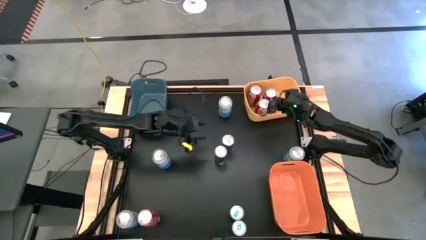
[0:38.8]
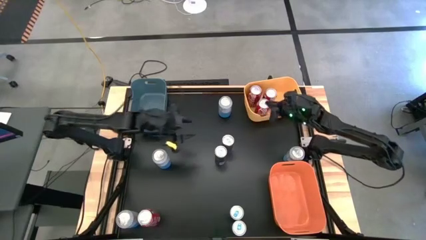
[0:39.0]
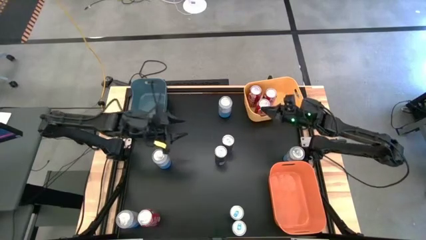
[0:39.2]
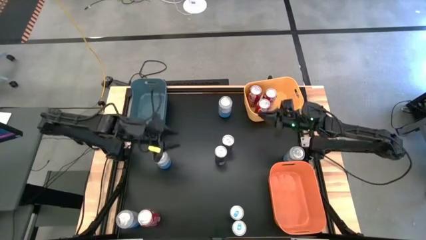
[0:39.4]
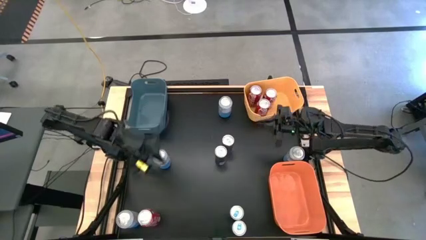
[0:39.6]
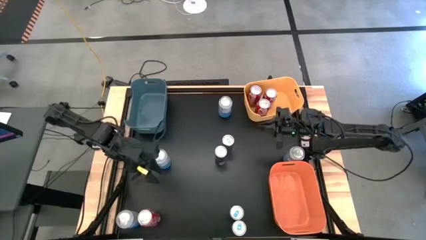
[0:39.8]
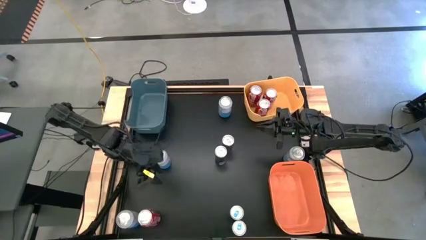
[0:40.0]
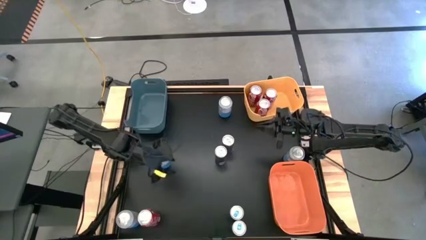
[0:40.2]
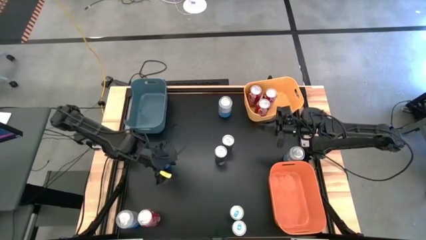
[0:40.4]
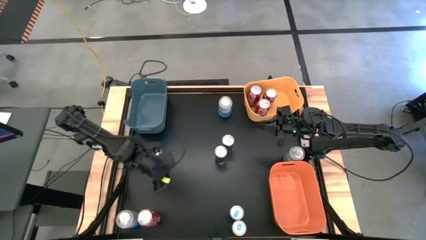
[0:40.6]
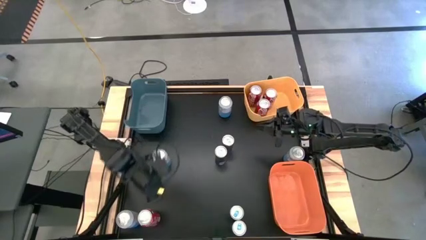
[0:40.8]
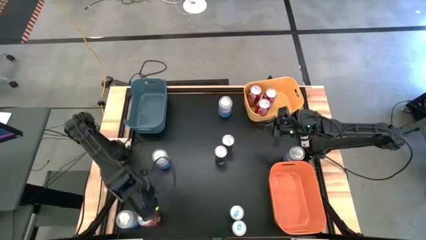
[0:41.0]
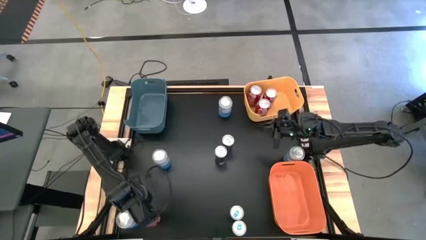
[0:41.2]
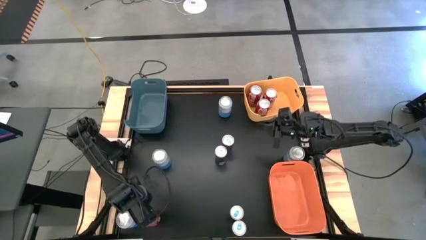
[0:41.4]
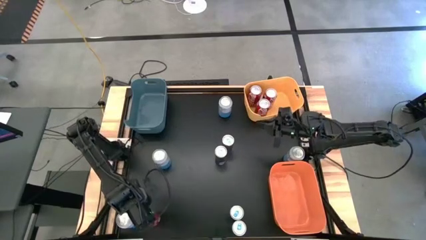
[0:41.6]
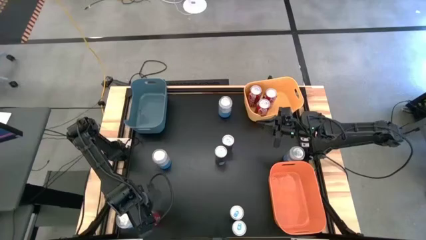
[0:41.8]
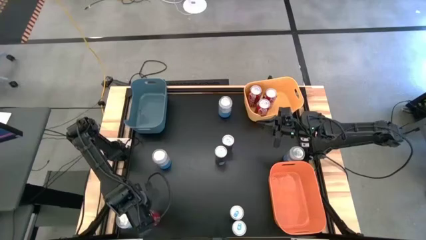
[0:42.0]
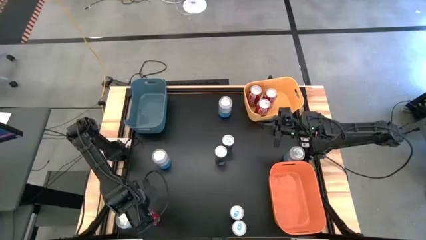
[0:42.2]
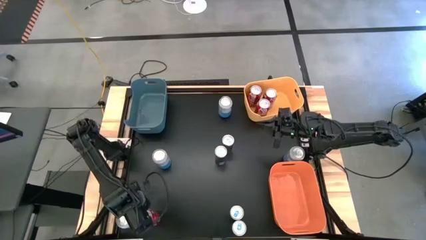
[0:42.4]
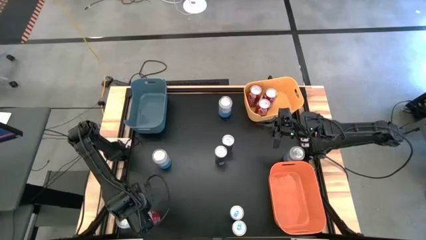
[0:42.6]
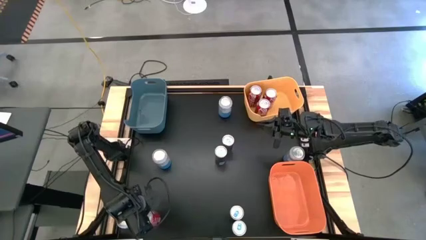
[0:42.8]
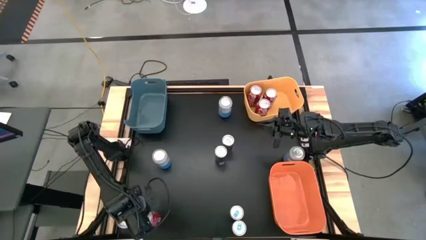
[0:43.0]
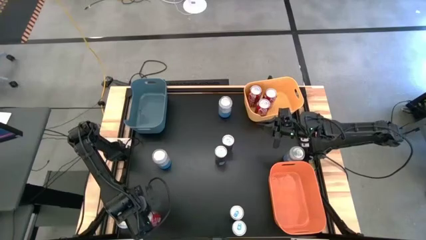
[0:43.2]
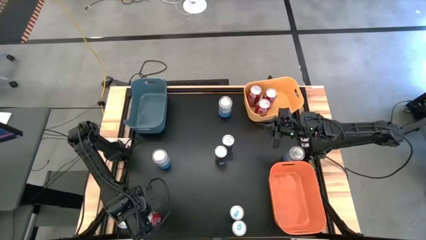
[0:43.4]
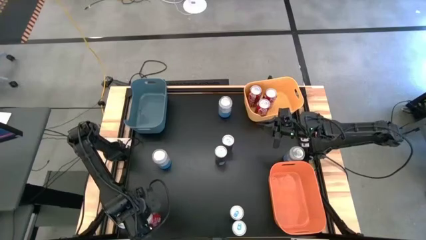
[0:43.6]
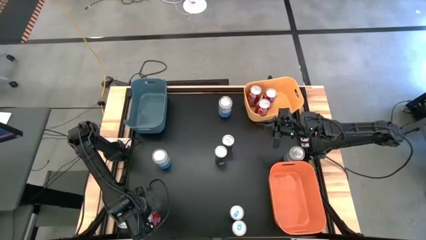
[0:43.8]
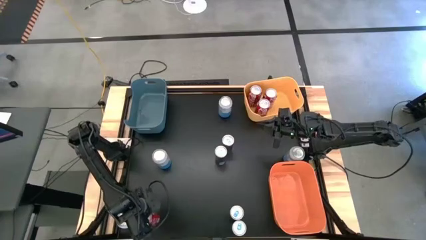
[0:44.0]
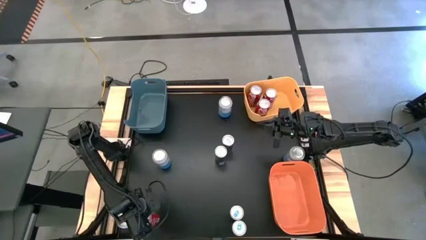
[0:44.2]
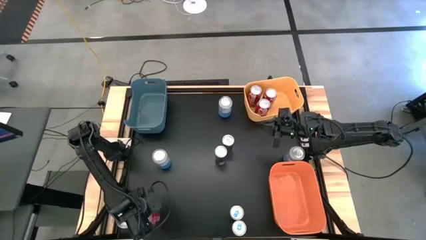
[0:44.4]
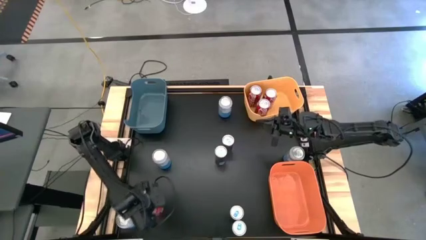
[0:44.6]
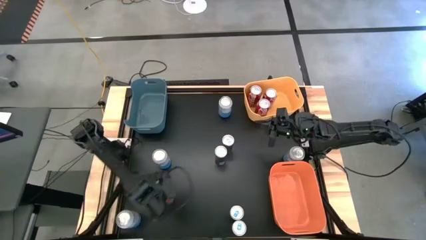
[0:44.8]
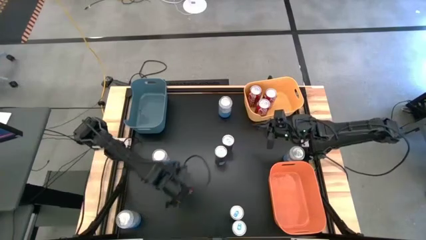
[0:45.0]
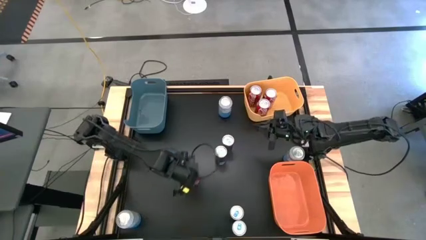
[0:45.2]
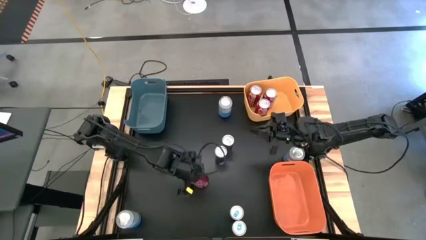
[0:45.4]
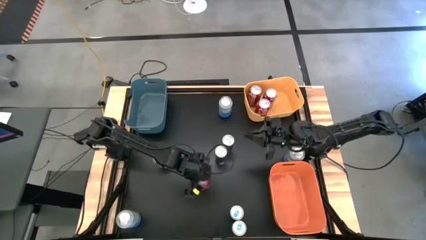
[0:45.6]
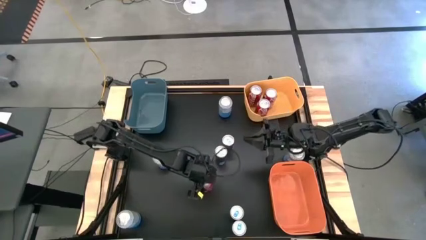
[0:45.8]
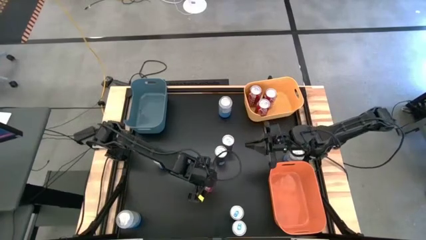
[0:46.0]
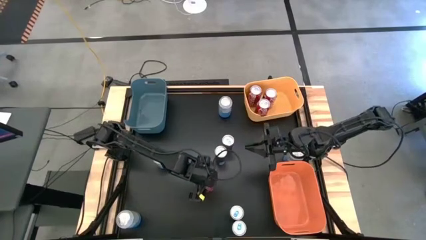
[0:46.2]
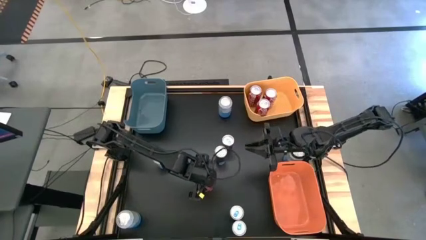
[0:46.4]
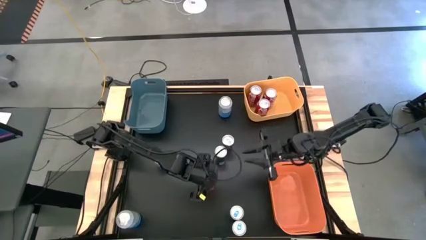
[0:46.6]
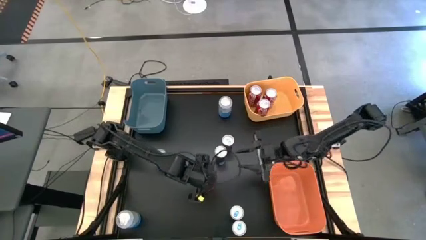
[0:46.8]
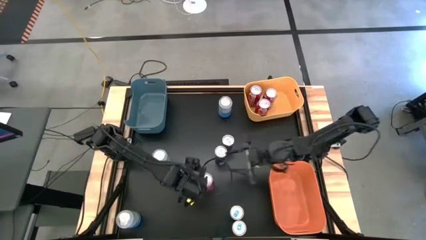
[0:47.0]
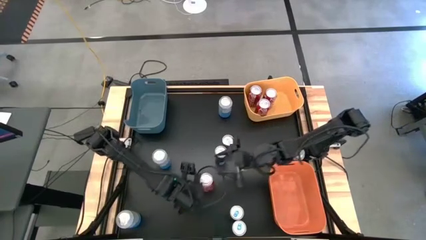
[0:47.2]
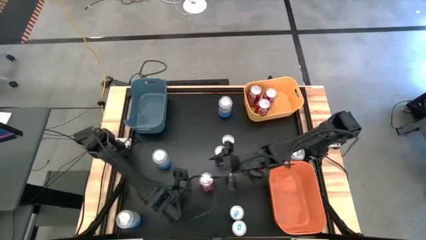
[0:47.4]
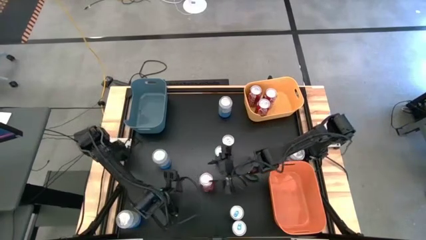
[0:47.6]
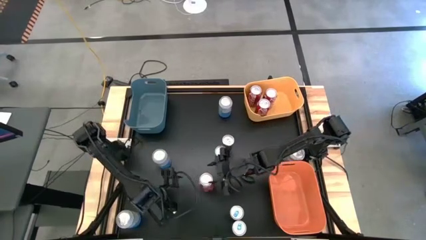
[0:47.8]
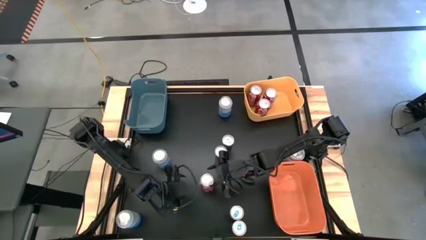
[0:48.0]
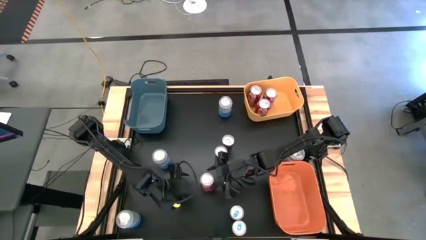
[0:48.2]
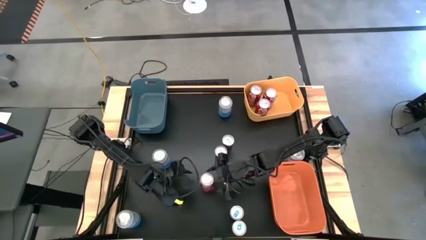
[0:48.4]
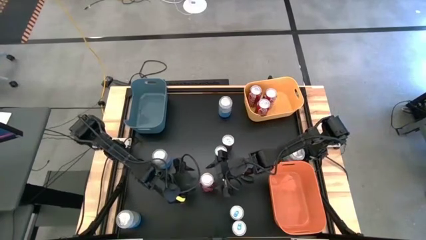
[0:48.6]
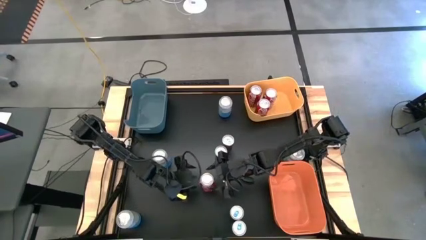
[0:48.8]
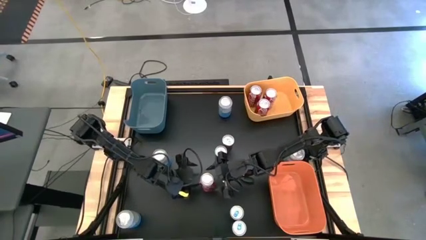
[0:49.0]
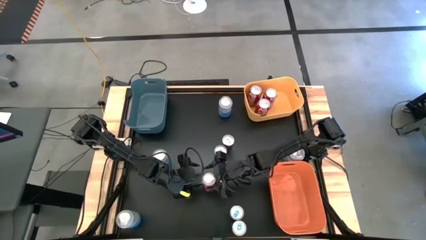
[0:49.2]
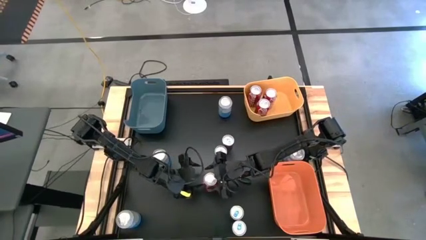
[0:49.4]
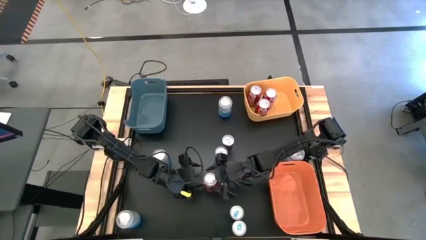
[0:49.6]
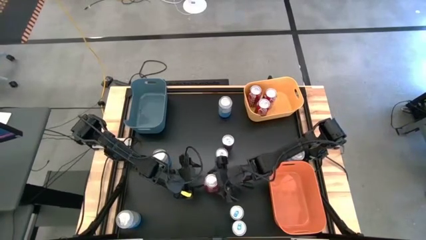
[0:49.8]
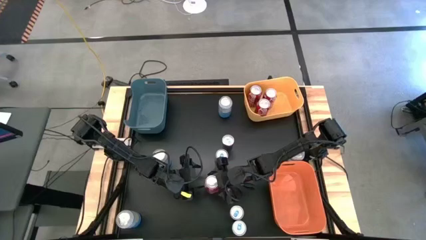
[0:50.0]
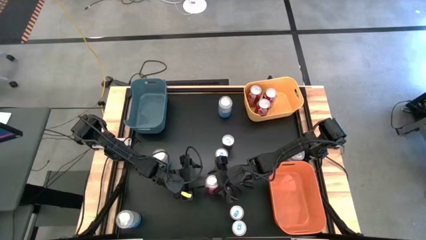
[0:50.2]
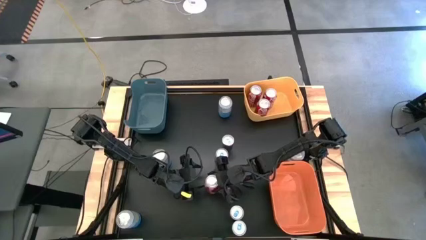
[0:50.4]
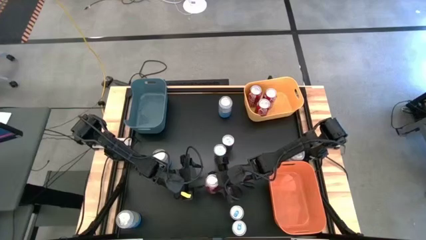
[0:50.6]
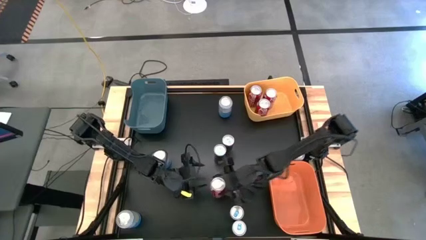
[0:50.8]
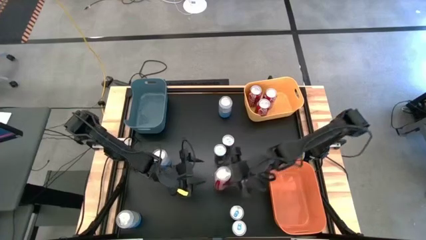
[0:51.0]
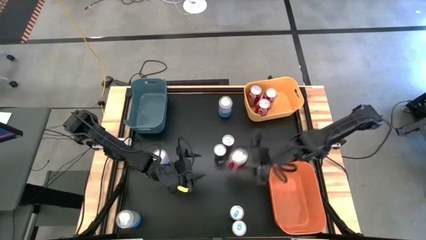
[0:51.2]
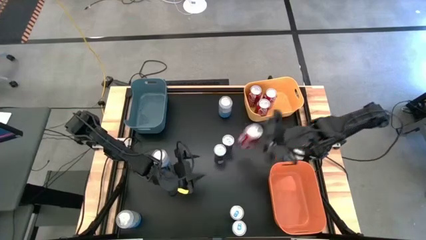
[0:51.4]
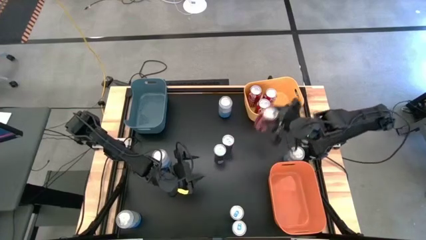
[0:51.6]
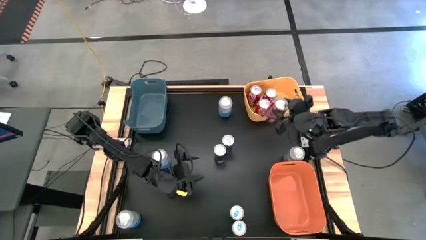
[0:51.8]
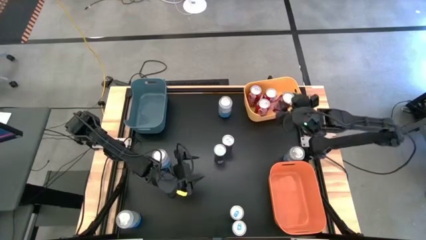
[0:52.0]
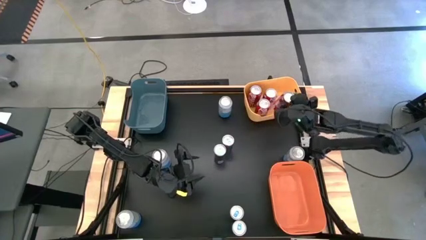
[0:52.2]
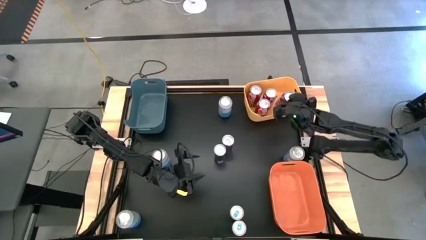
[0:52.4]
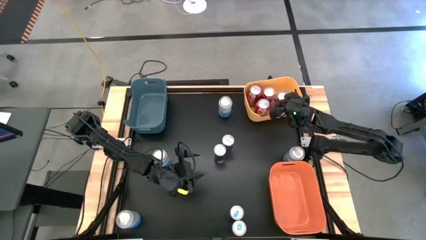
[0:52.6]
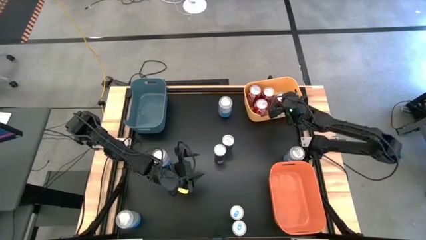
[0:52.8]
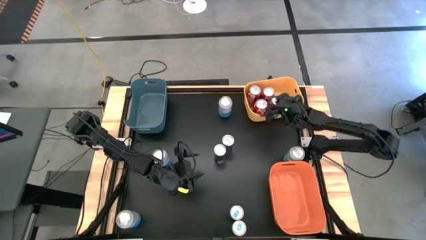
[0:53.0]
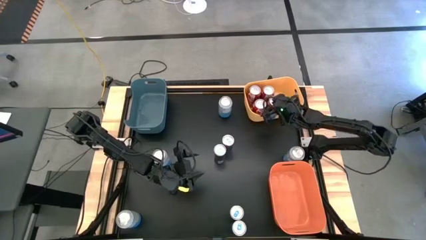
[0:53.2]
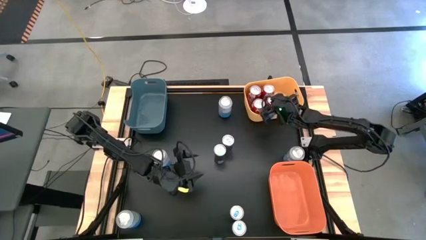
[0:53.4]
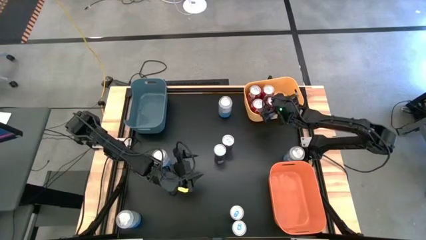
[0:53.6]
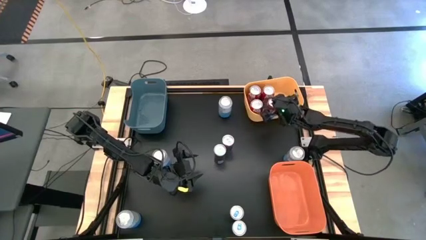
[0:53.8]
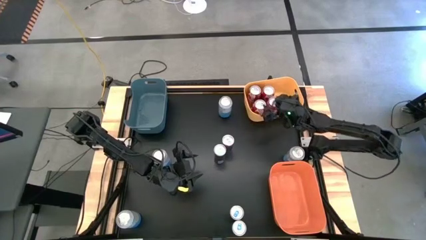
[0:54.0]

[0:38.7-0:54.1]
Task: Sort soda cans
Put the red soda can into the yellow bin
